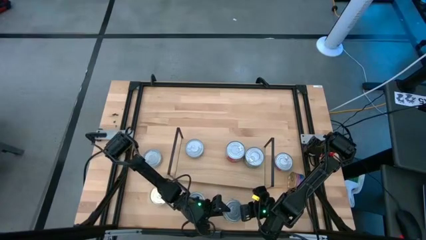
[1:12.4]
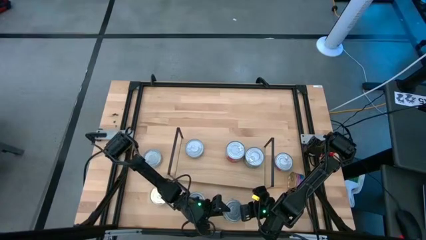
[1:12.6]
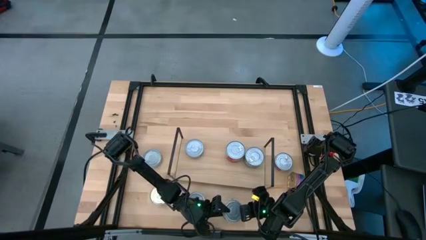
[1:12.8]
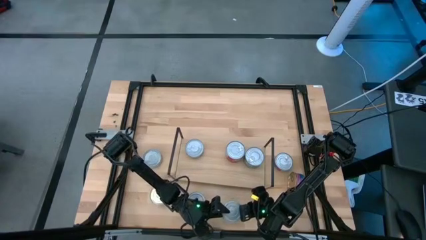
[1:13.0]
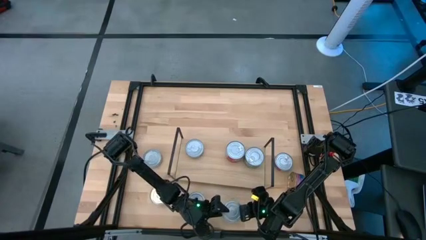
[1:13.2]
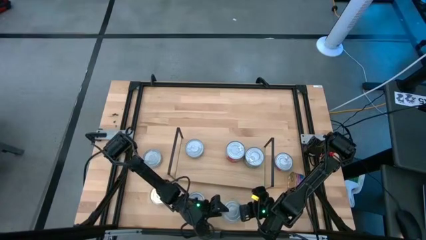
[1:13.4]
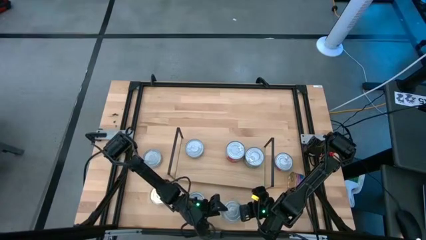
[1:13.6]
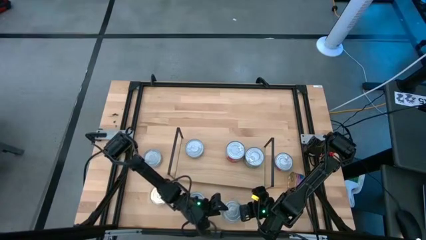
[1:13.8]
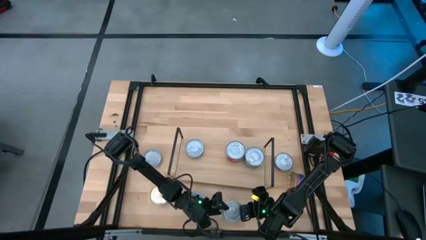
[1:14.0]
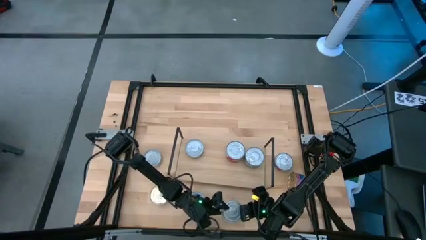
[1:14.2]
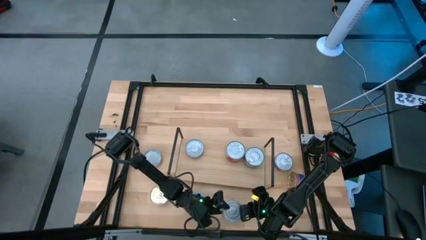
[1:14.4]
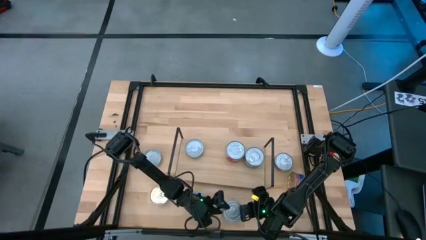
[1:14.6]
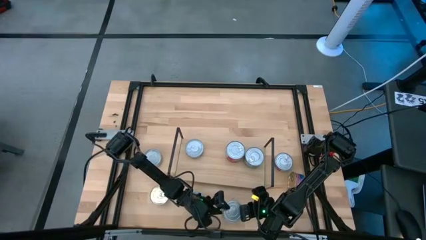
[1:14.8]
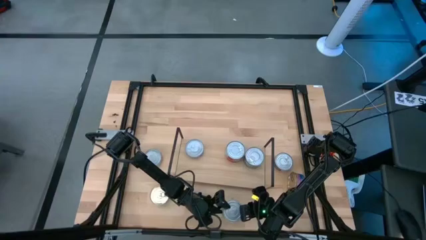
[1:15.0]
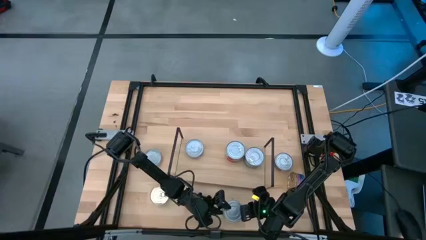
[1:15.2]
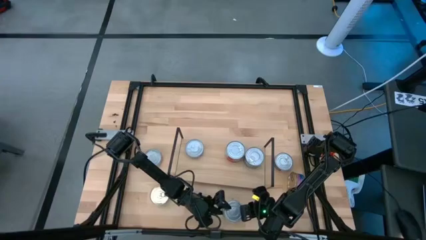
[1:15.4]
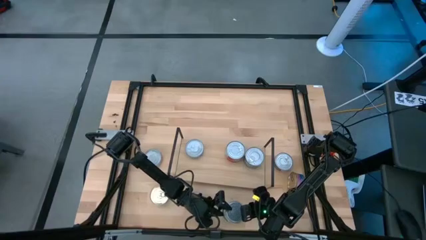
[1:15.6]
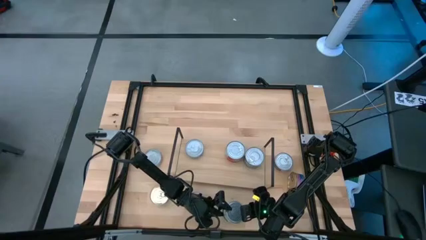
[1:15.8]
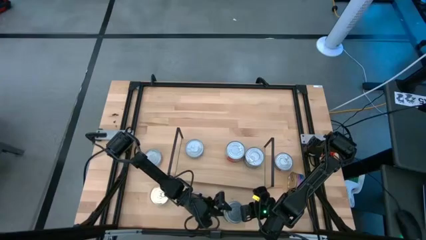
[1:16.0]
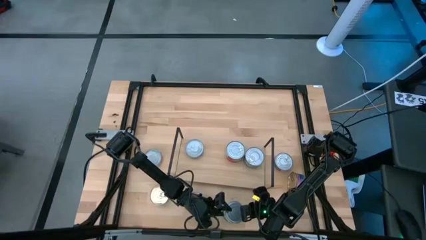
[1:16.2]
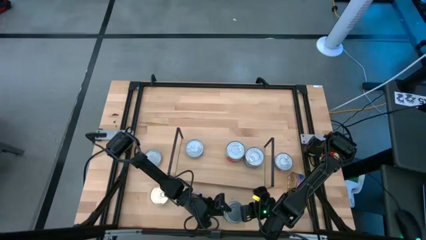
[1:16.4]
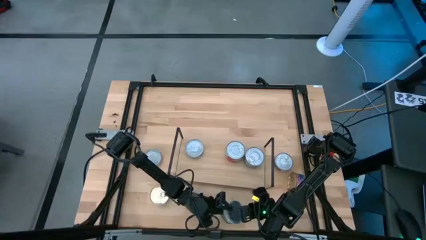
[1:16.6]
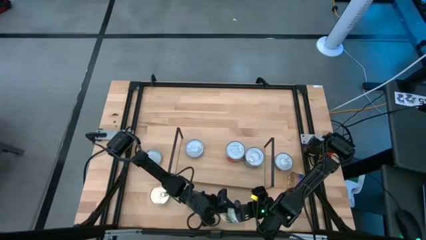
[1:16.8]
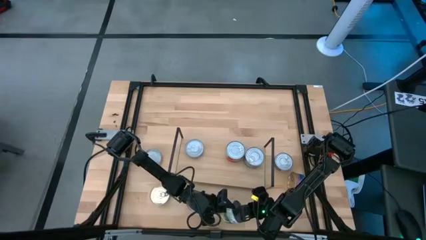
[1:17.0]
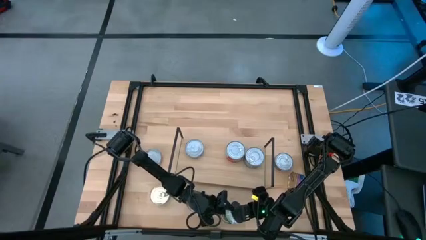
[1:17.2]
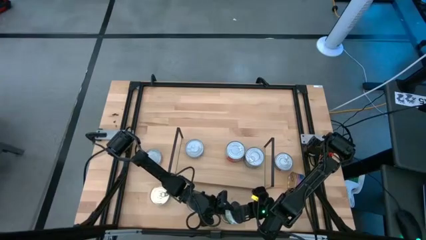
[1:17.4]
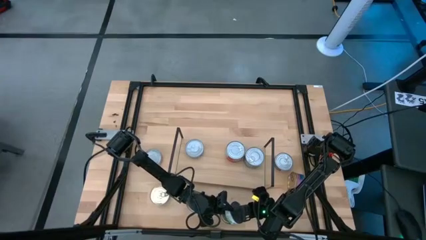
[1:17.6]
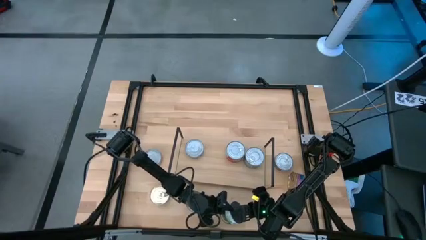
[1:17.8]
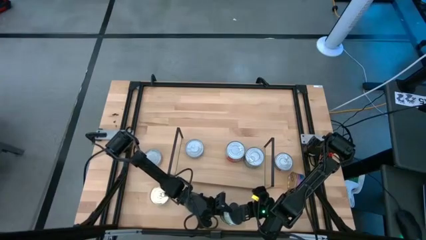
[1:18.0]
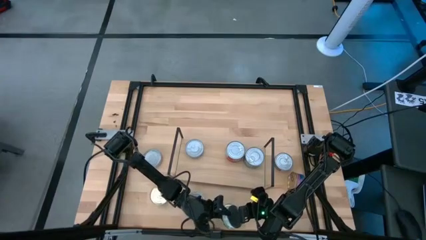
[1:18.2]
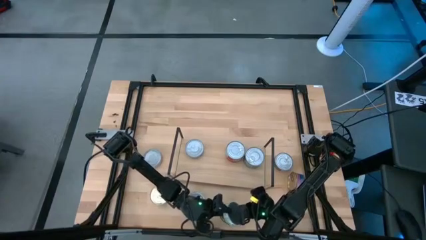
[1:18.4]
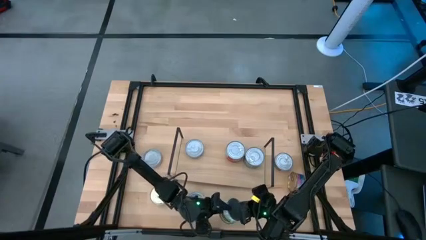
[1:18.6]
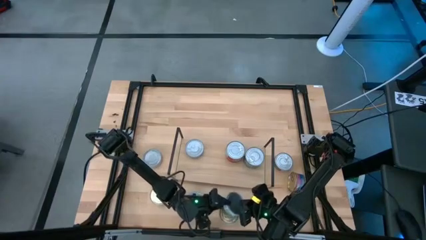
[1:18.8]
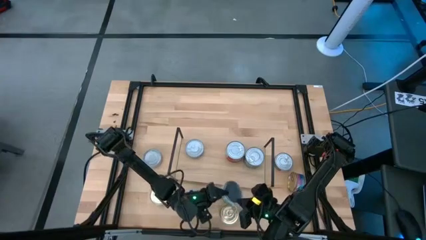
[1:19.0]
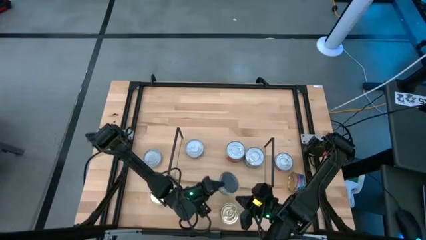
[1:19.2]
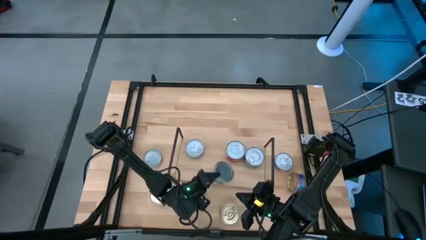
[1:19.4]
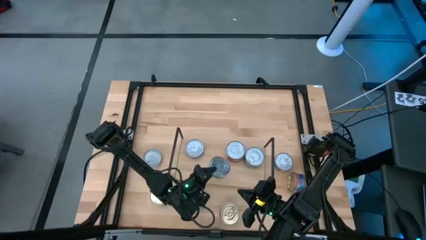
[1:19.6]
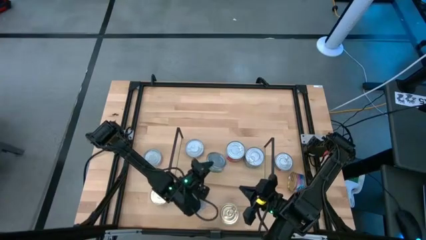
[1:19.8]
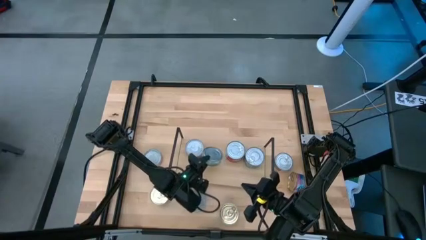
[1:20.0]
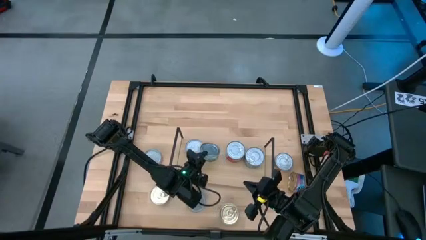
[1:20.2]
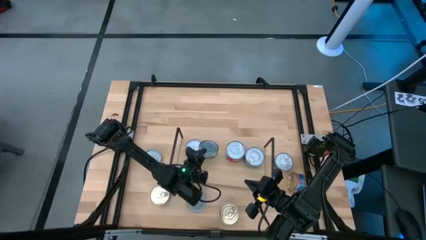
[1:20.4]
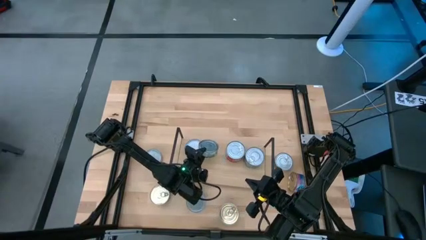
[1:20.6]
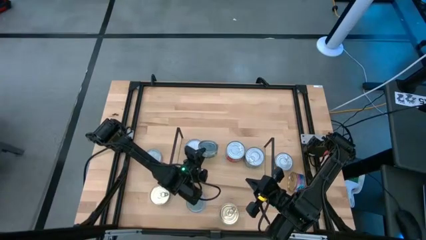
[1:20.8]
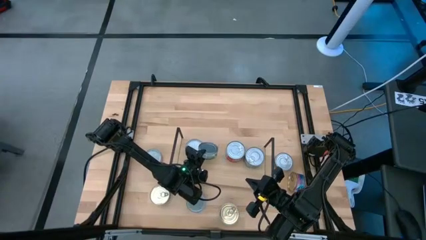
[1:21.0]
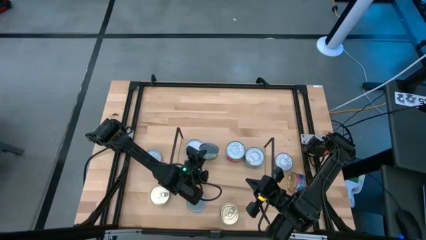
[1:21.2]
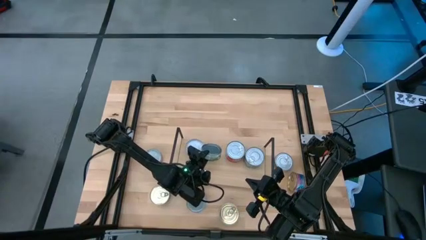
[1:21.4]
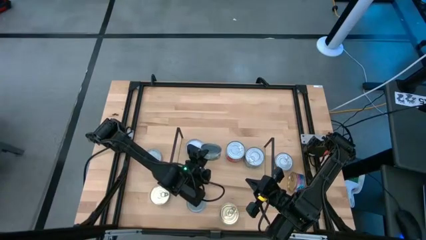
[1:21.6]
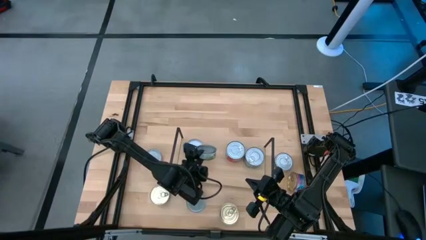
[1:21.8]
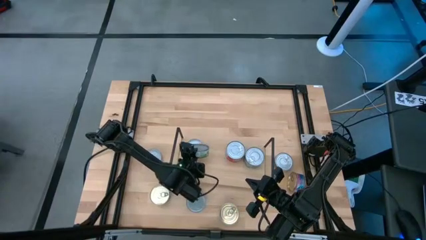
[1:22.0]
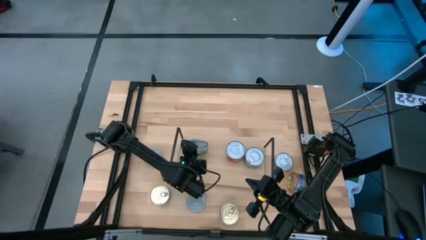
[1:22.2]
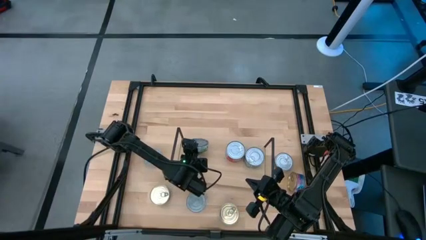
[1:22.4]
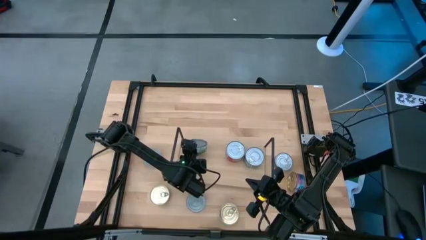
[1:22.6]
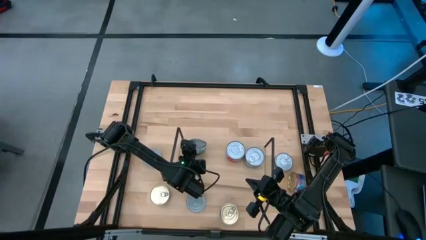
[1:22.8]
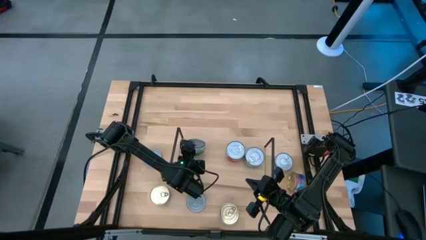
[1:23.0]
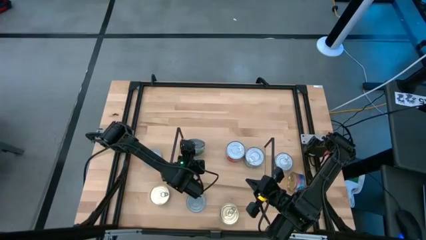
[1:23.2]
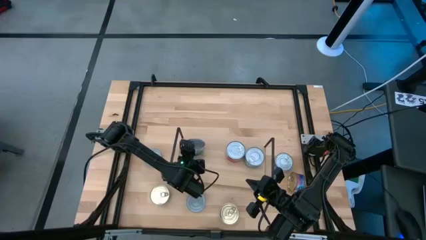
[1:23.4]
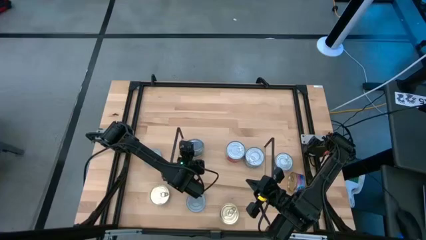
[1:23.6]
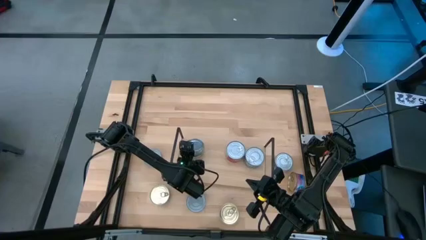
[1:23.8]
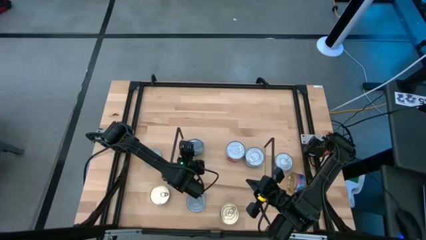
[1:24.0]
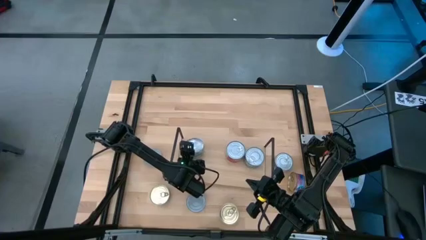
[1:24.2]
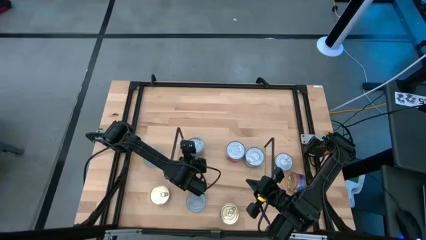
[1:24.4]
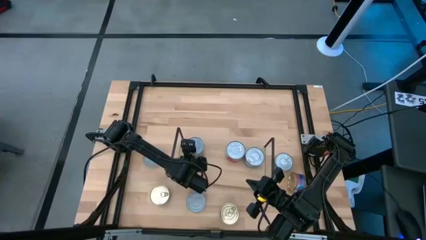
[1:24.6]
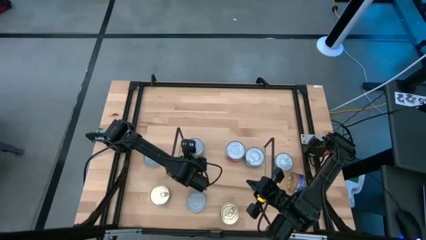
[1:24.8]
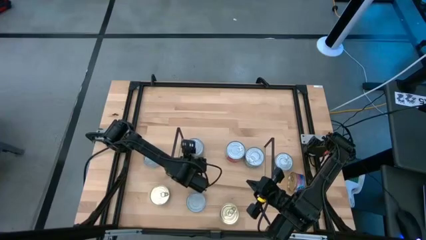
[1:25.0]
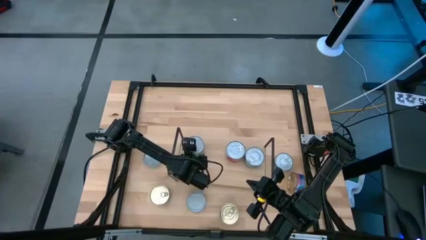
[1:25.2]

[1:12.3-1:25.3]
Task: Stack canned seafood by type on shelf
Stack the green white tuna on top of the green white tuna can on the shelf

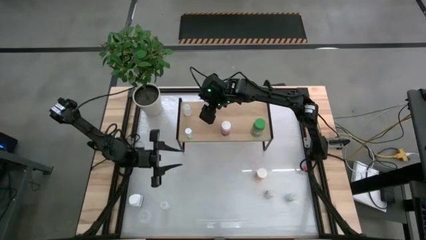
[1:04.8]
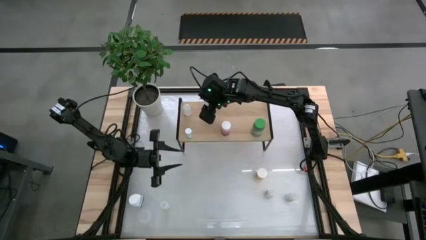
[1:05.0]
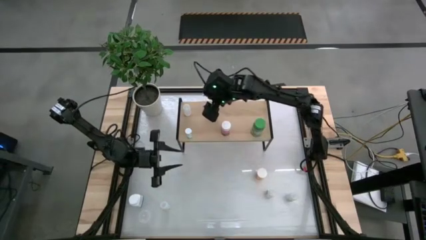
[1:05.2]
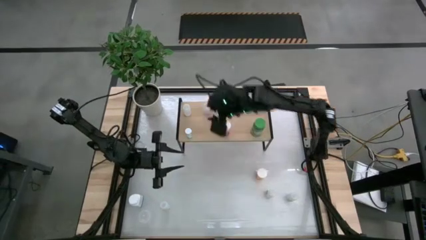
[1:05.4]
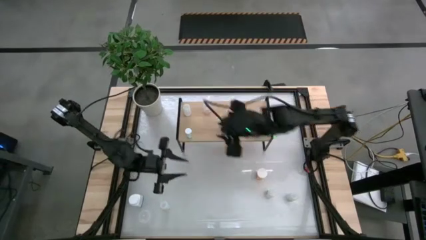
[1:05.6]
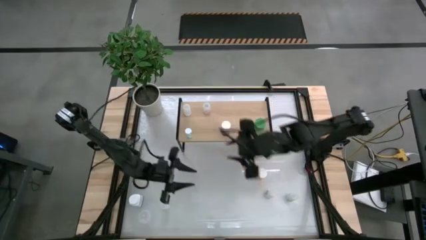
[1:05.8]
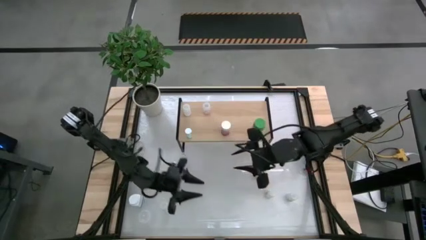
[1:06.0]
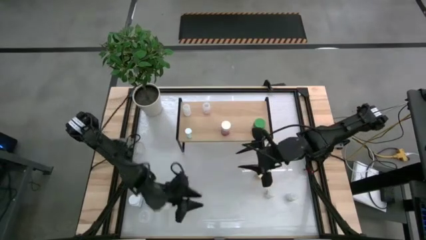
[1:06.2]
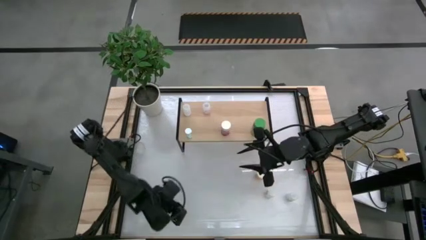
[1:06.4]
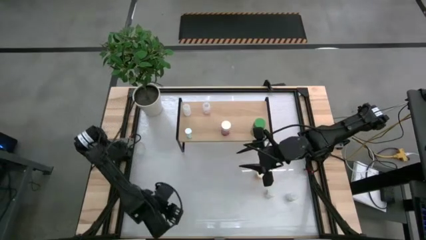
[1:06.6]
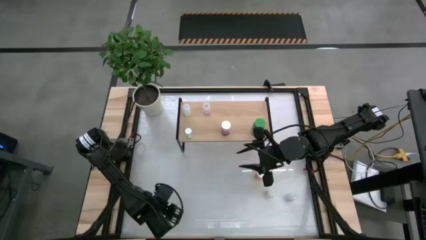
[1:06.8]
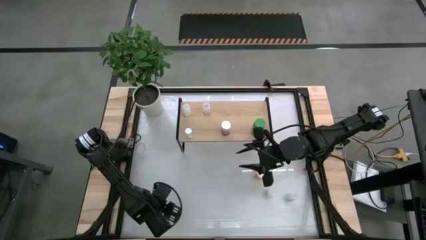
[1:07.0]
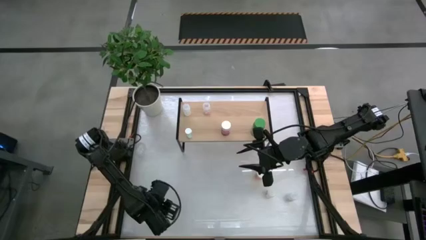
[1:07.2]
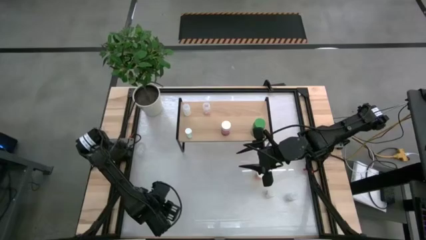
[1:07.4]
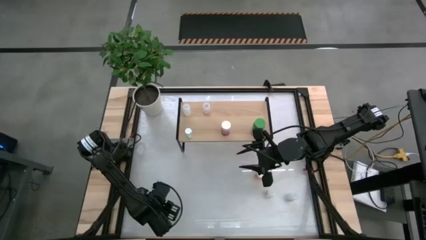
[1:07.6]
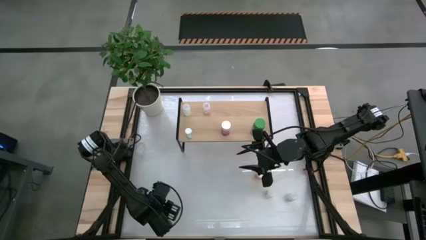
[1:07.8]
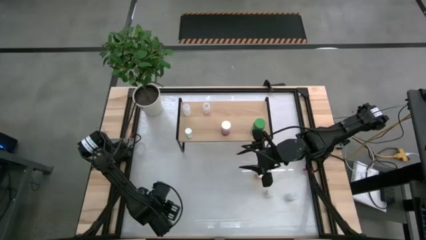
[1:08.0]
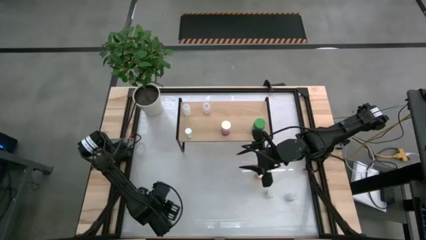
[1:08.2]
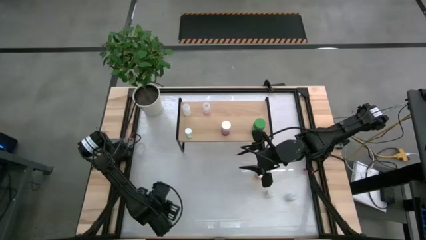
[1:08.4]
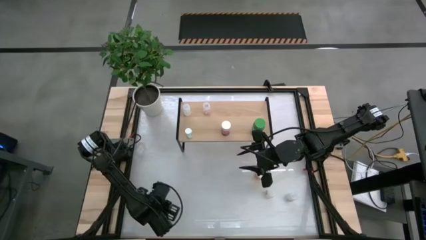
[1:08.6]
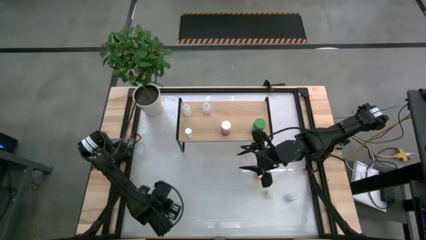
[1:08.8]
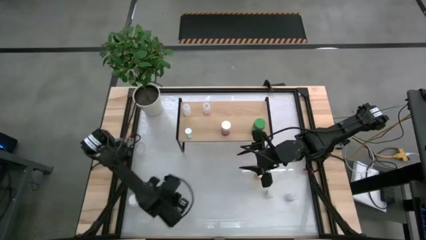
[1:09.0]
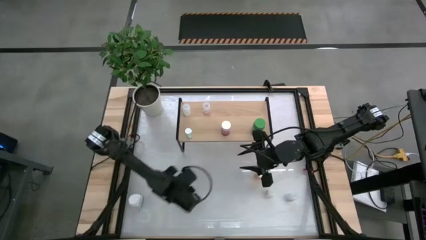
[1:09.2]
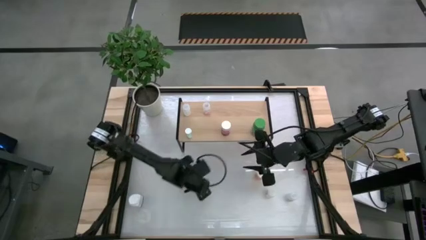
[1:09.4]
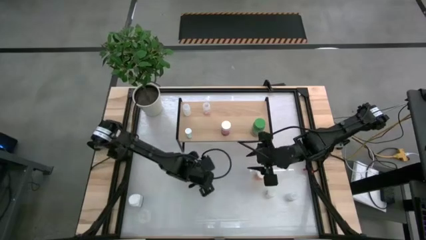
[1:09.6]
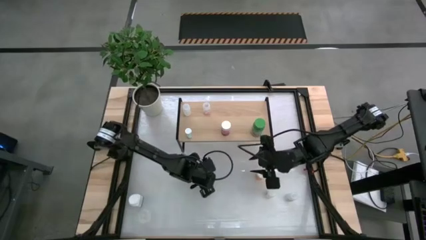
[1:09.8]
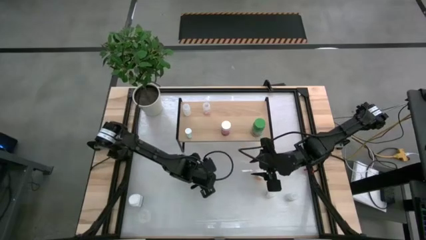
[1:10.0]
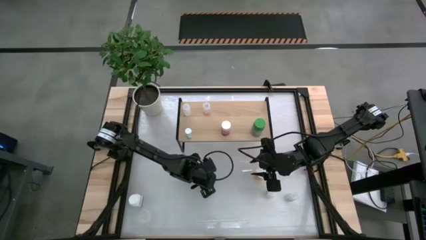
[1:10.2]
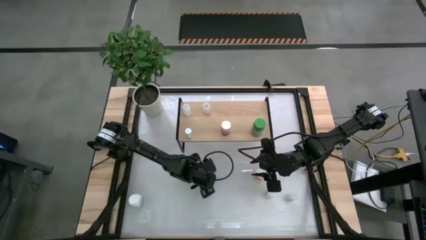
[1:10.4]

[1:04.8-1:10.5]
Task: Pick and place medicine bottles onto shelf by color
Put the transparent pill bottle on the shelf
